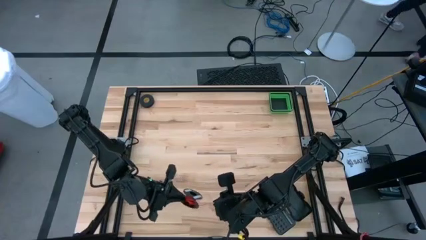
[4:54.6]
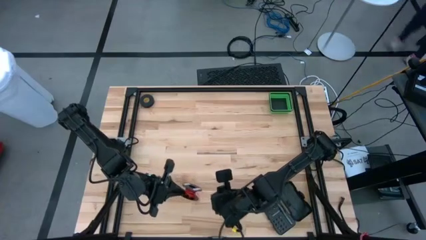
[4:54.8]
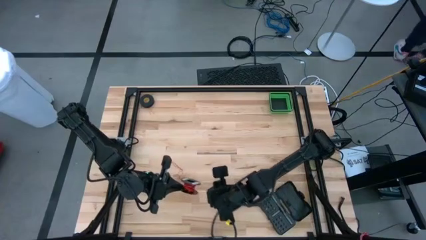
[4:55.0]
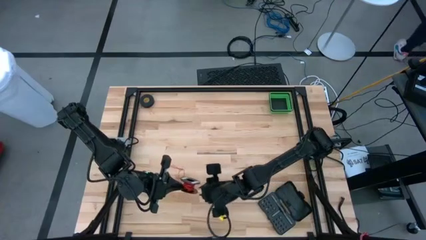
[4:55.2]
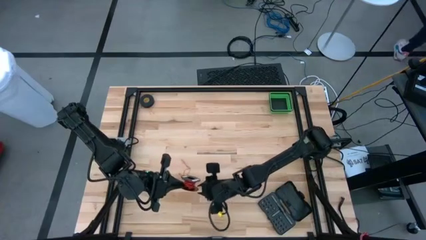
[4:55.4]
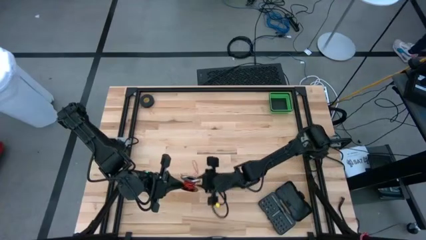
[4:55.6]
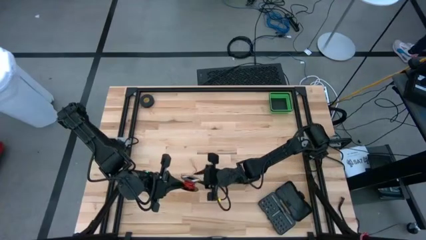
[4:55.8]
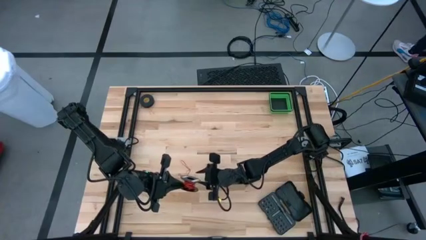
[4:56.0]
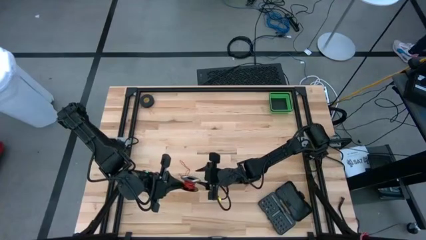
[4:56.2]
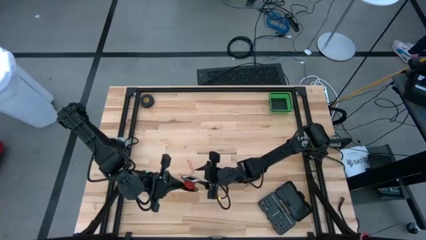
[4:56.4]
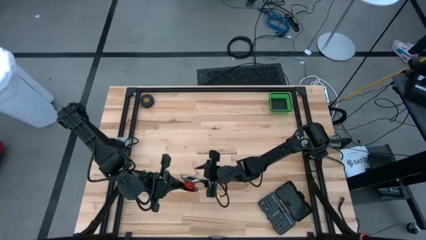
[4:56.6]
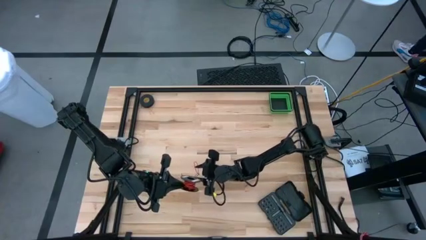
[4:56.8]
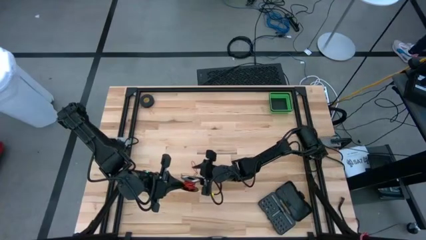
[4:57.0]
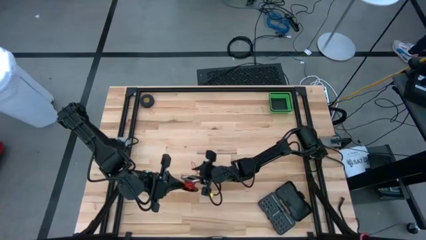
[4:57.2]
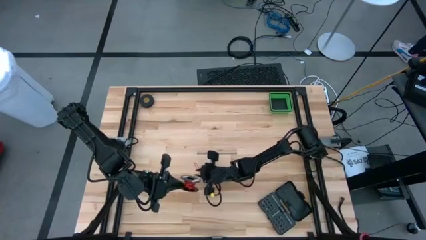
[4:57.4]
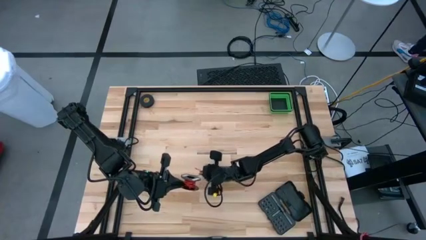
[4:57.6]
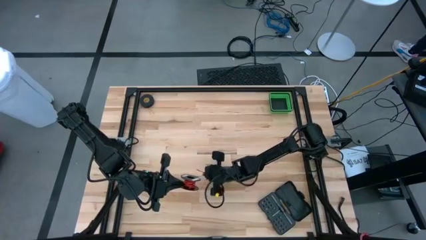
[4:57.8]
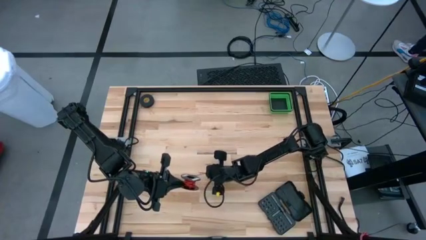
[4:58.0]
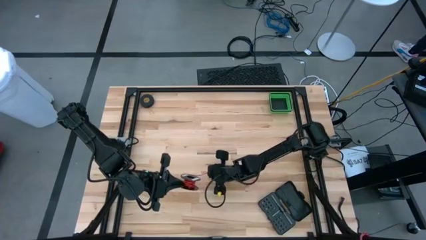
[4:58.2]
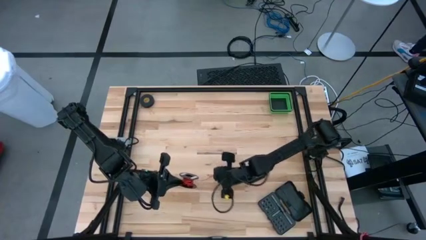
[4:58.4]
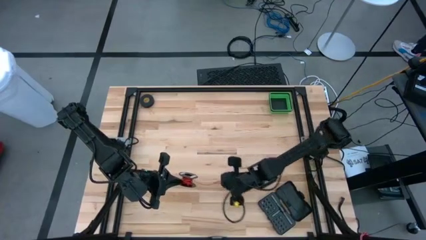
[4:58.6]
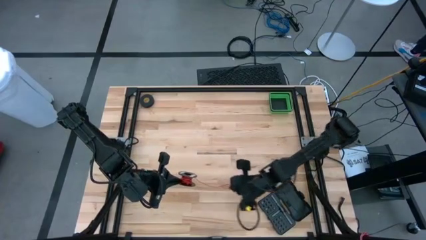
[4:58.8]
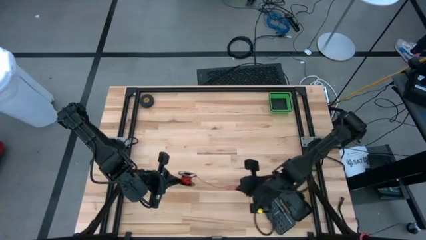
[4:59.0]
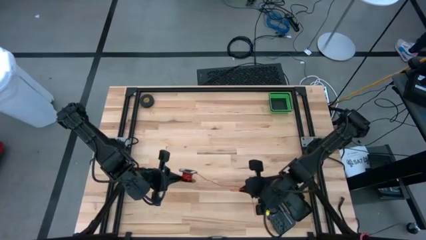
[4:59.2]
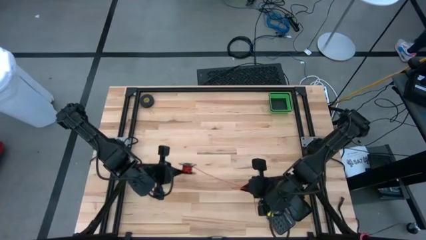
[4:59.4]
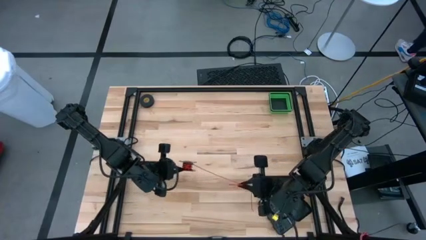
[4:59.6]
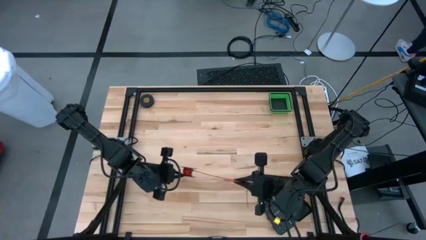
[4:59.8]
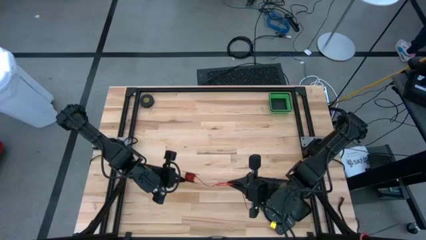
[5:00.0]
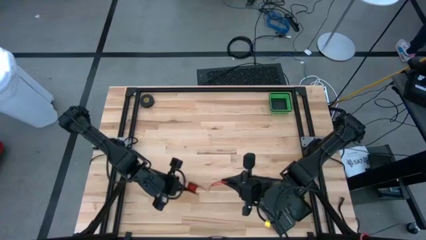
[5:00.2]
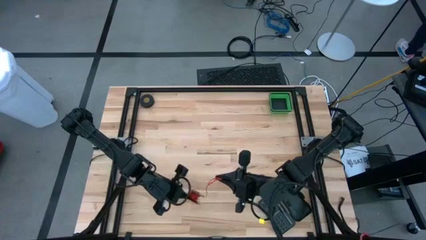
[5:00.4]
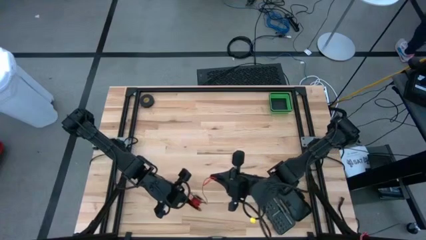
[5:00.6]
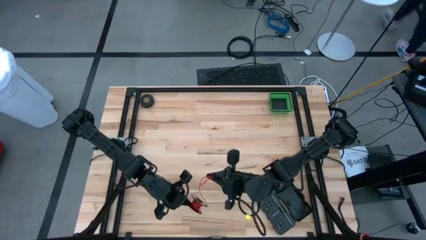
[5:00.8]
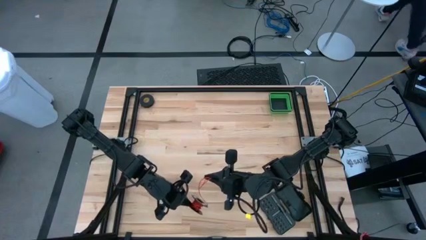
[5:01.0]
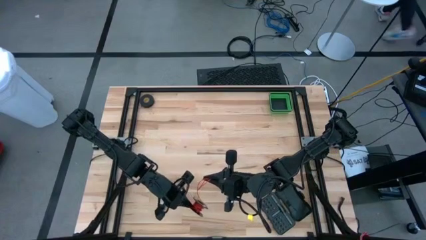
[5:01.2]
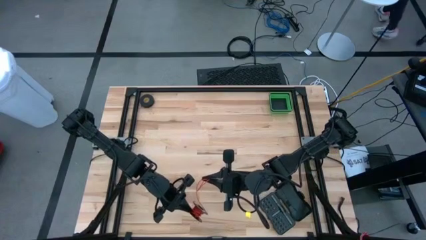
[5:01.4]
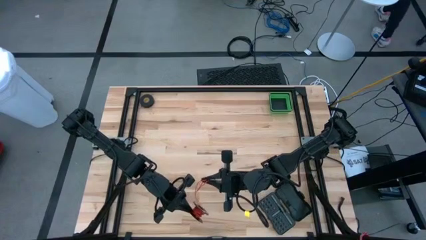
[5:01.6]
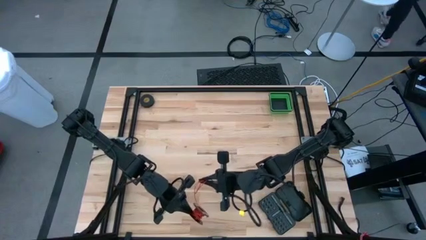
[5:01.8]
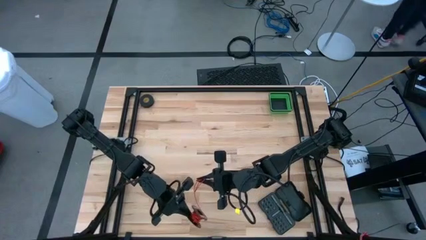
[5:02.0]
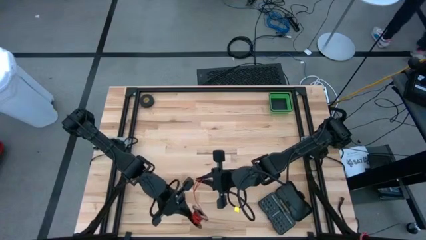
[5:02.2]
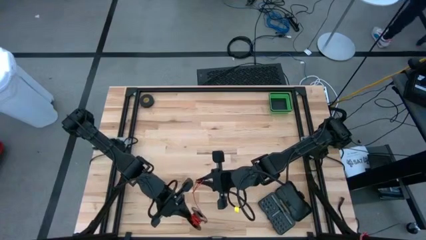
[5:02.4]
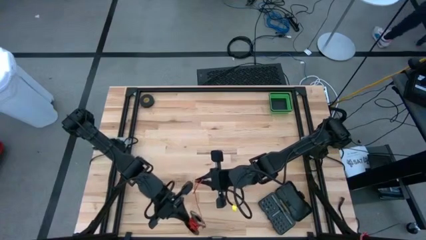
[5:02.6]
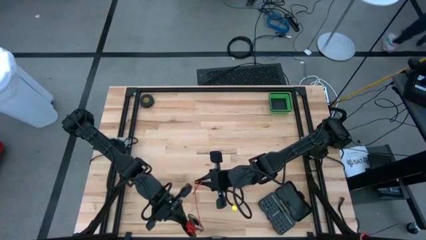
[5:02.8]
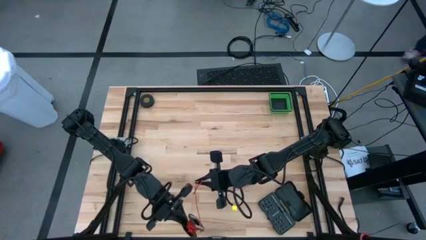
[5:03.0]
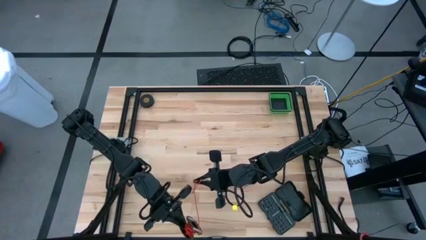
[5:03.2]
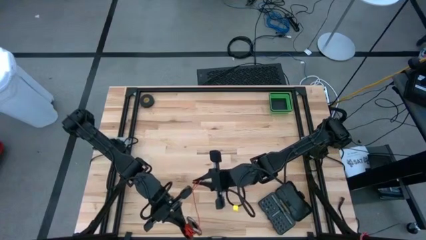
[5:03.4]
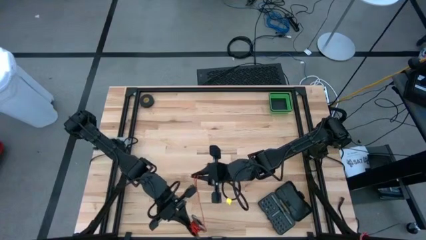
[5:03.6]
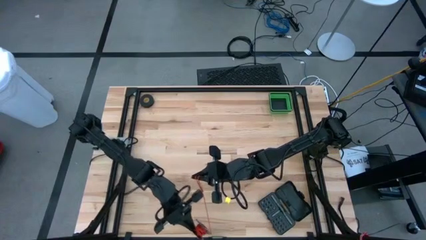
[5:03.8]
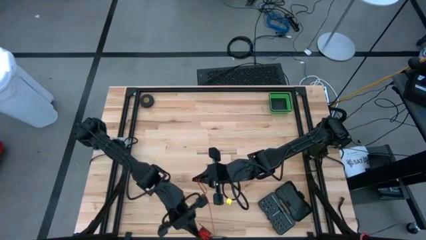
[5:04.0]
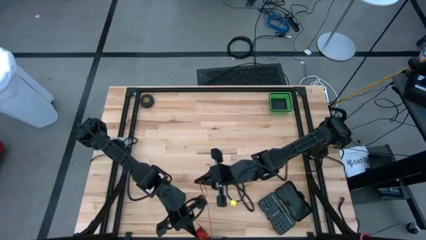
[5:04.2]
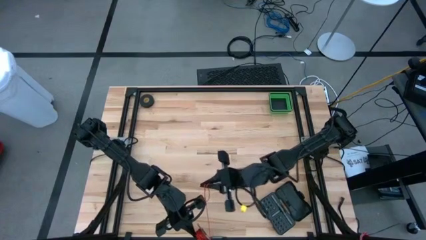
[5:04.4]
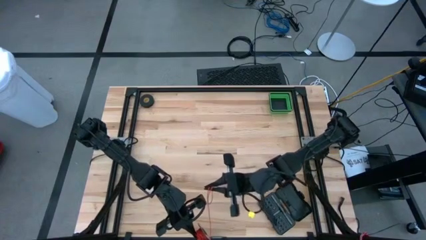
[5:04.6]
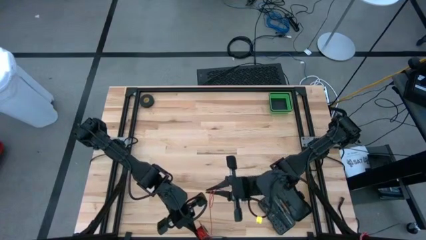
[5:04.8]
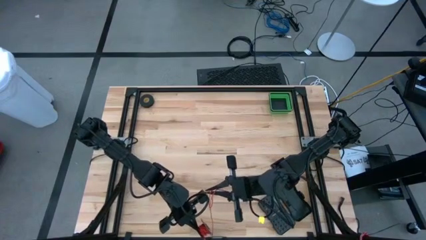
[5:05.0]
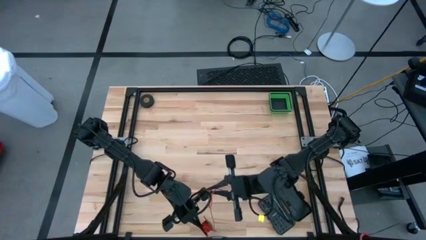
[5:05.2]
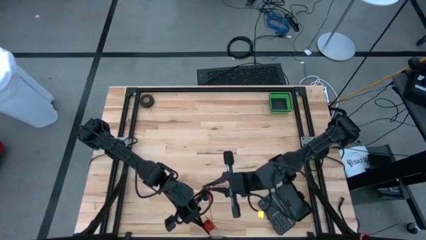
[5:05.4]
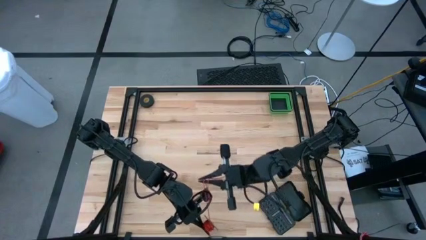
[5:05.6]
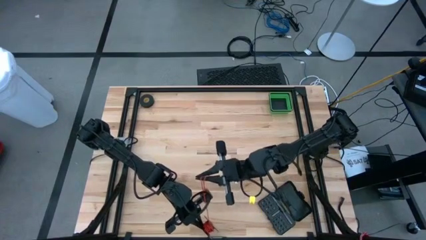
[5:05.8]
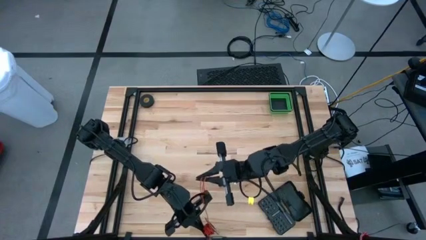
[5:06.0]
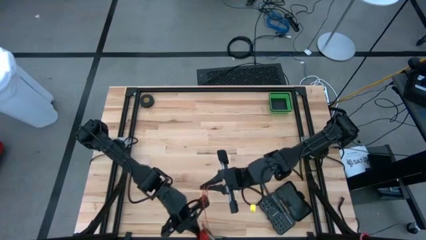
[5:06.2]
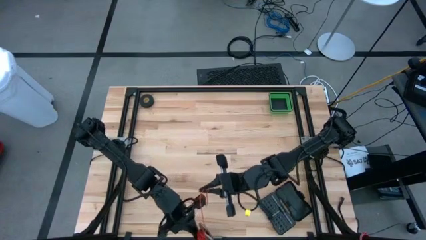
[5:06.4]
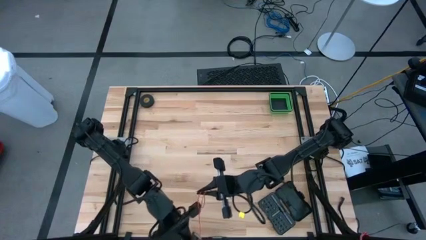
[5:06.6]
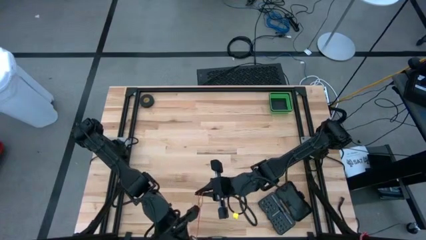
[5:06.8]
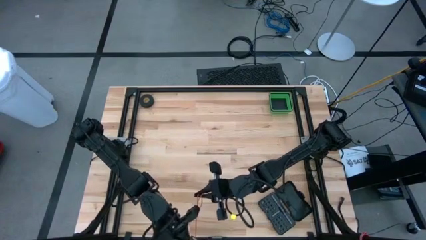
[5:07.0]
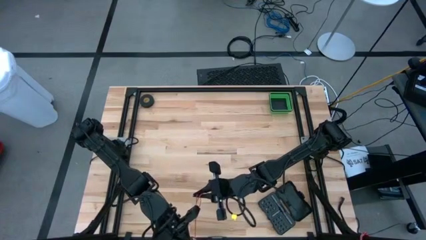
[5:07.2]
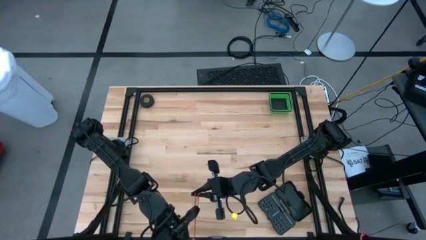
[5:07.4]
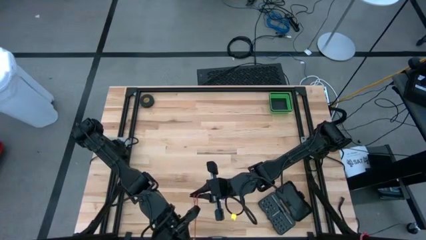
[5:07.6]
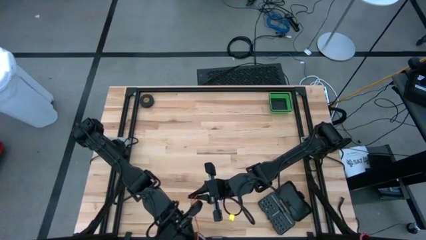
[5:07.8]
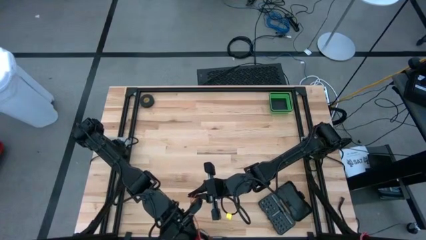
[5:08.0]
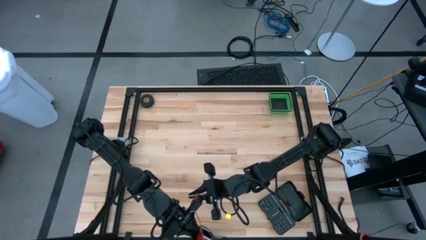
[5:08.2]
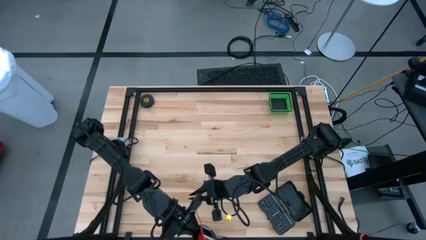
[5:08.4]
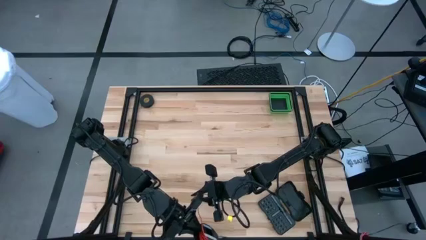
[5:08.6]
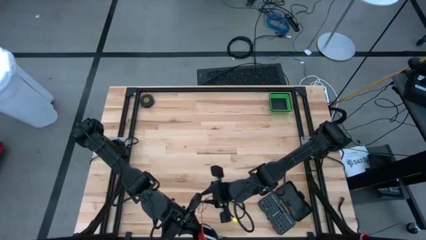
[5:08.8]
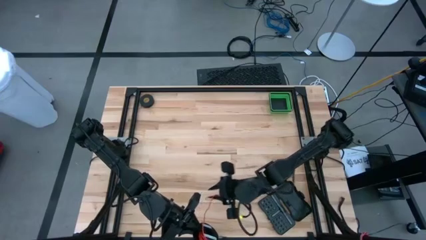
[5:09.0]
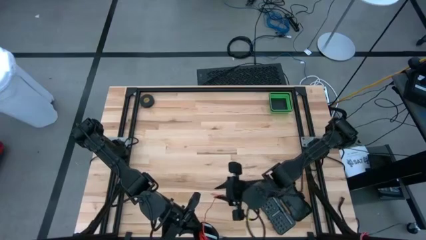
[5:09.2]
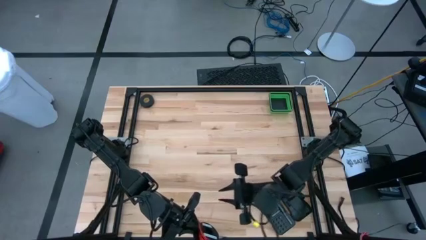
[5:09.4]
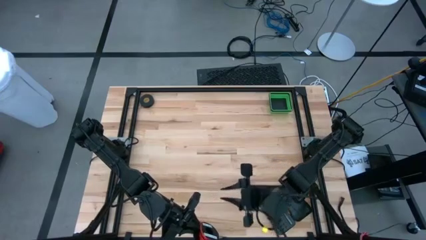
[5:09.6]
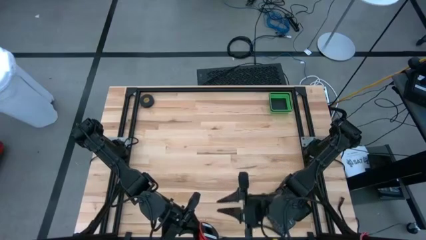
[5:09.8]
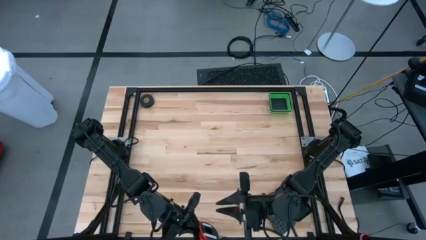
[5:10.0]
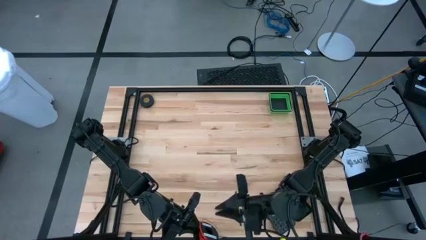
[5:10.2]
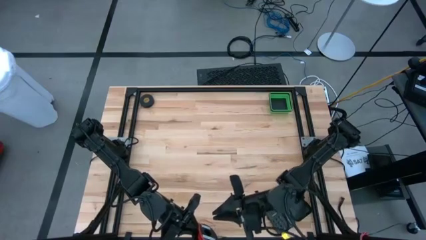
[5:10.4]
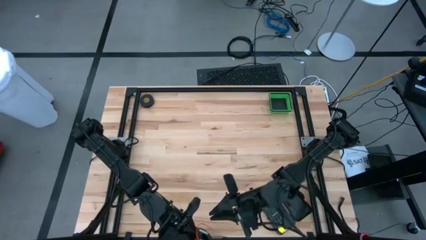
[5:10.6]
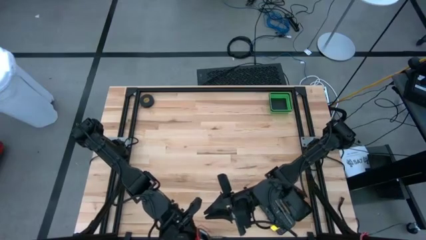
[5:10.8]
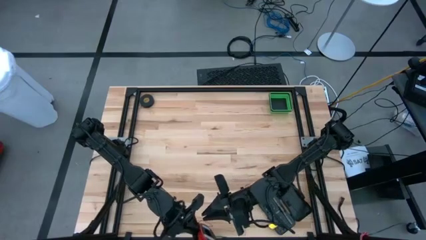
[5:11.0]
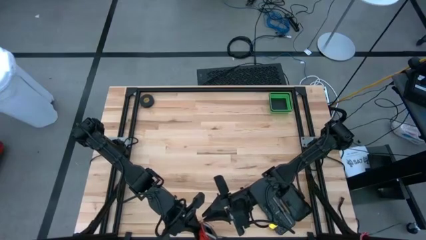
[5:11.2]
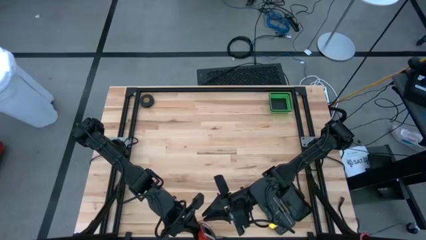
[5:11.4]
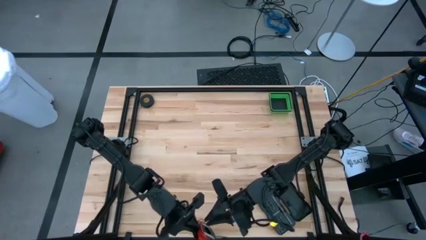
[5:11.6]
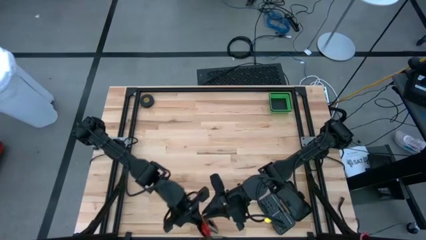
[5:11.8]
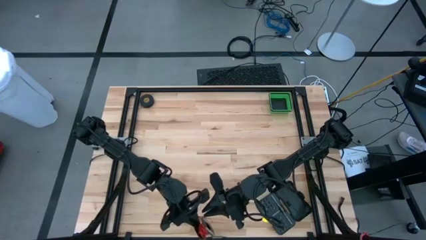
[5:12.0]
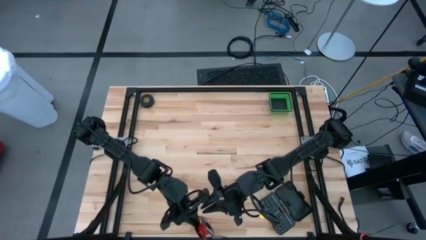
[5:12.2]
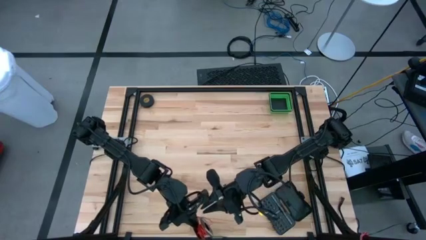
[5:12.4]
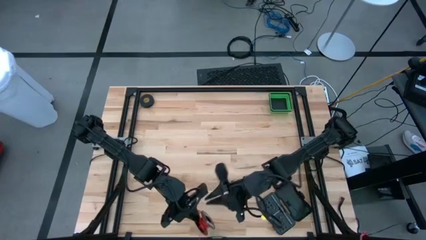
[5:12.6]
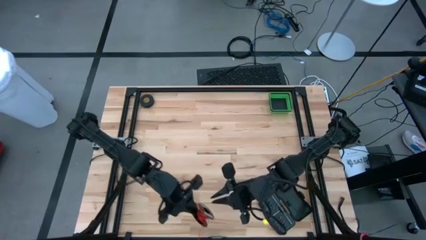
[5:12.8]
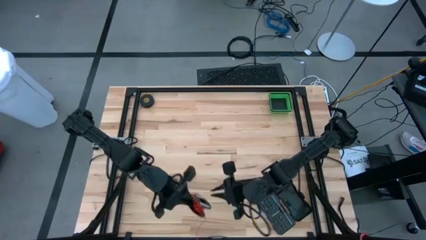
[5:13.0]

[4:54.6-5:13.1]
Task: Coil cords
Coil the red wire on the black spool
